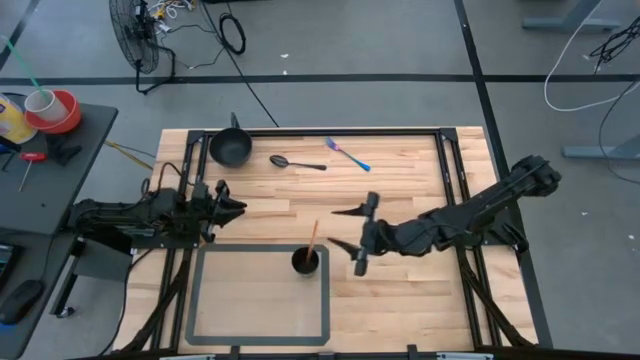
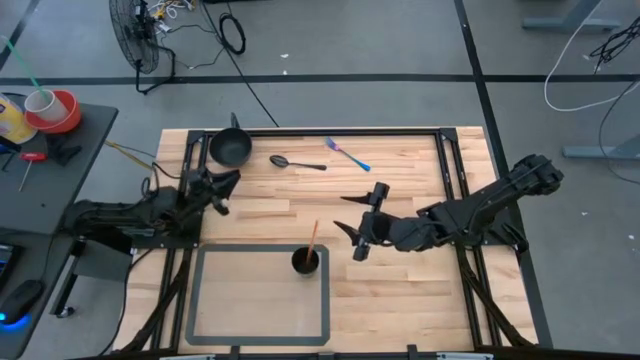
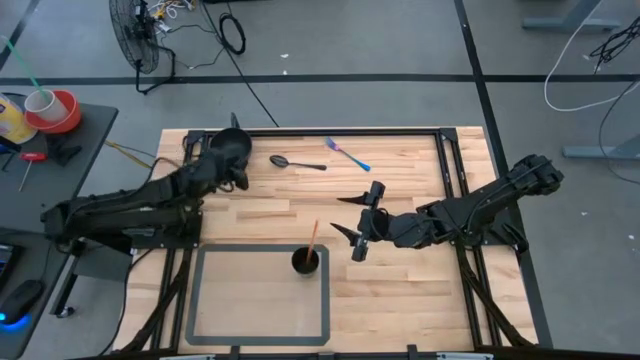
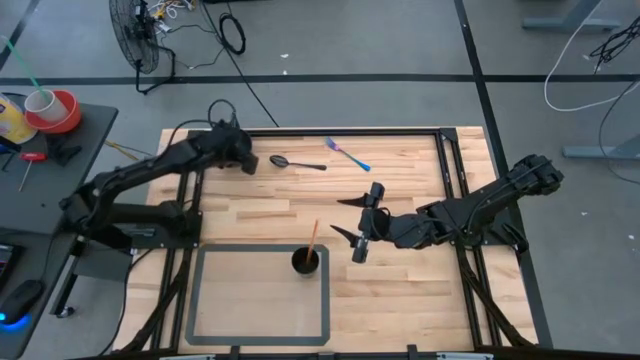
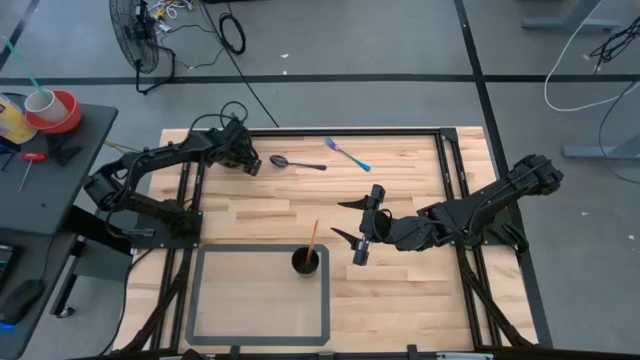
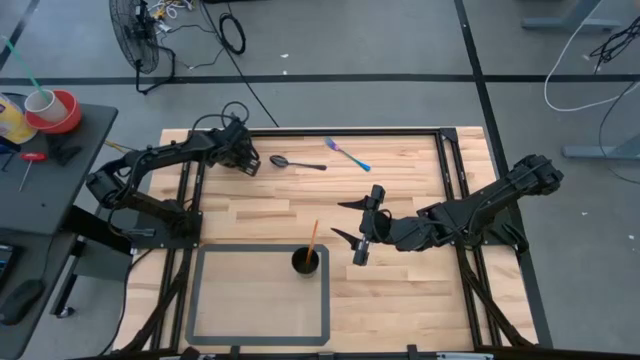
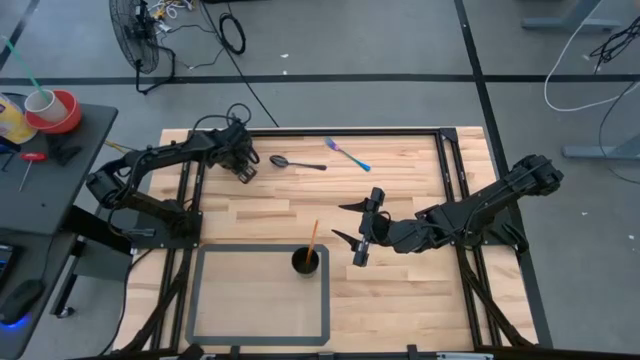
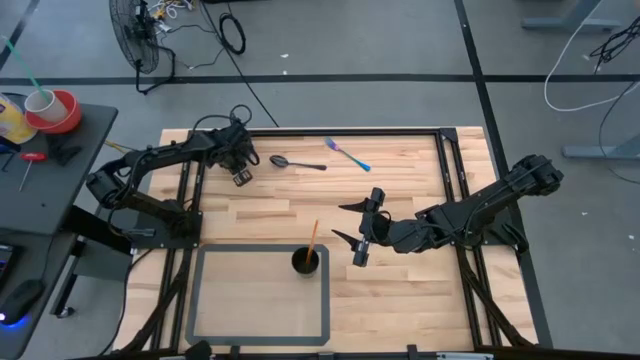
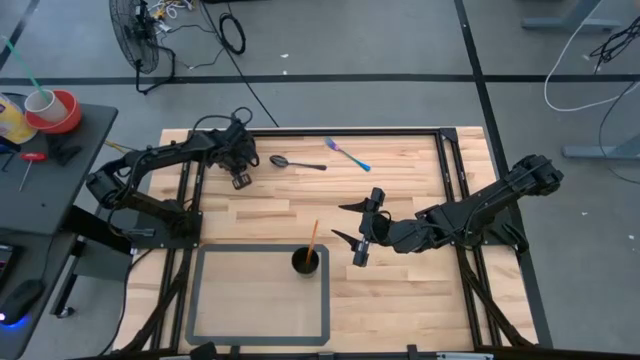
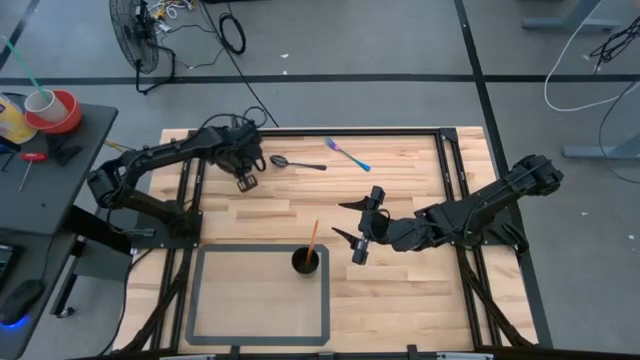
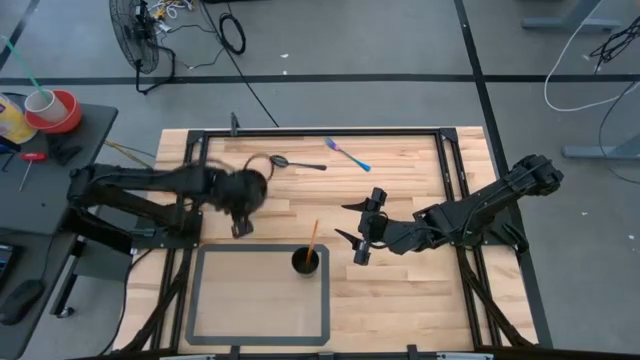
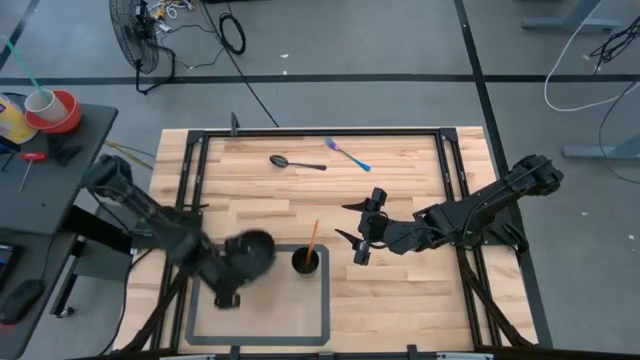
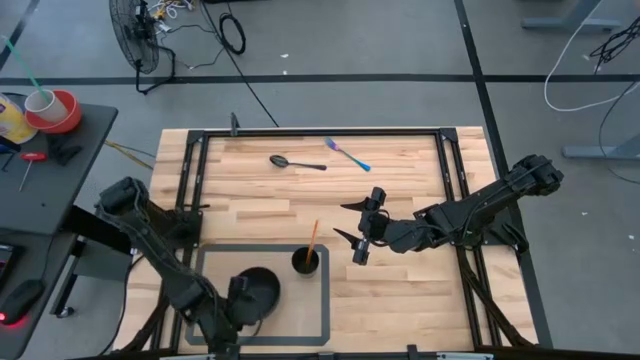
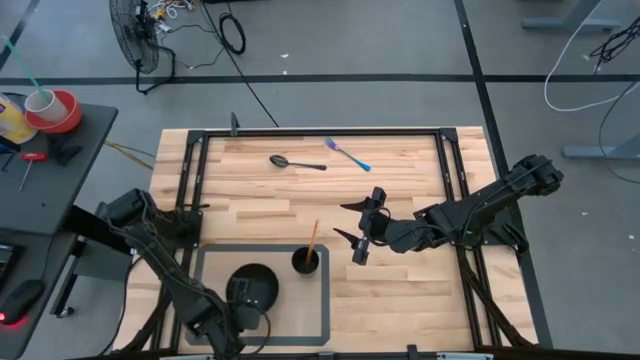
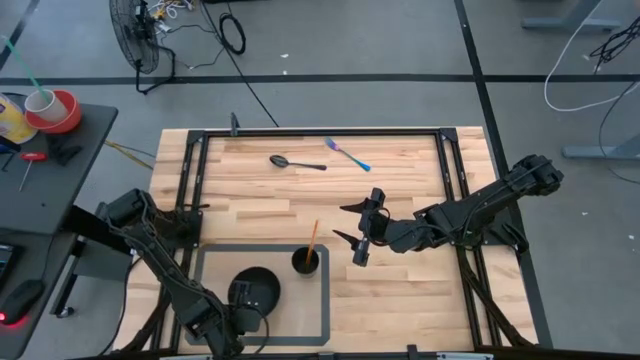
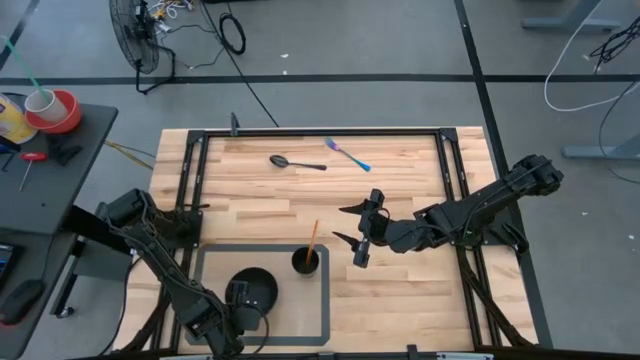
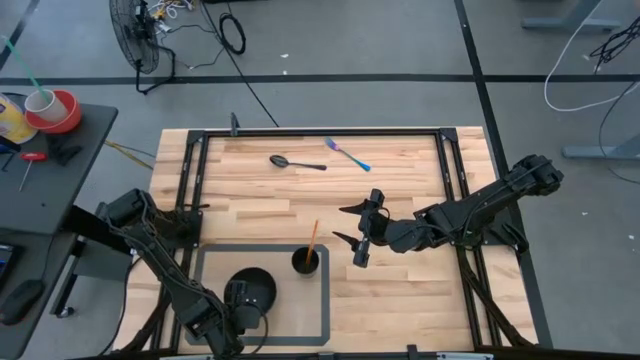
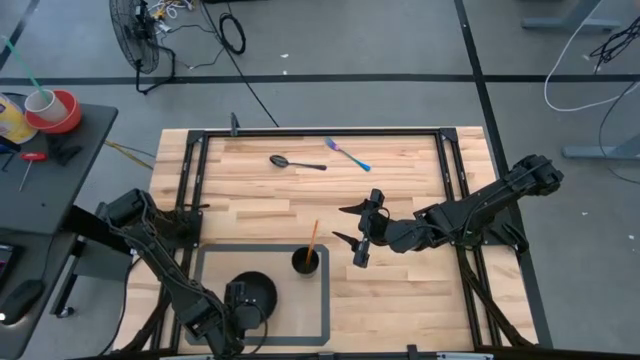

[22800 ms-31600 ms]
Task: Pick & Place Utensil
Put the black bowl on the transparent mat

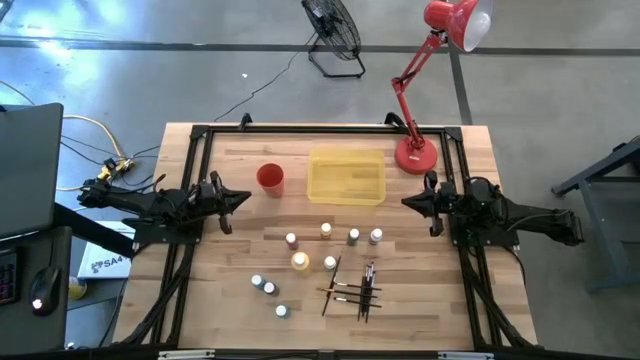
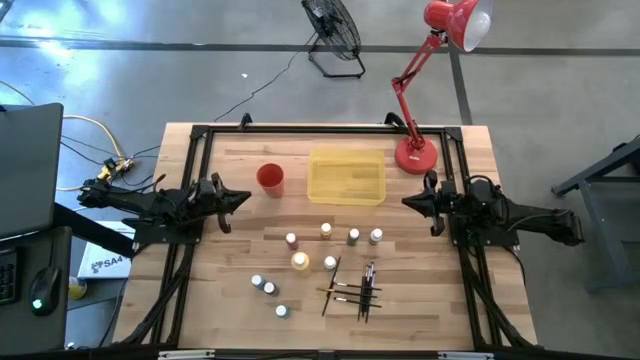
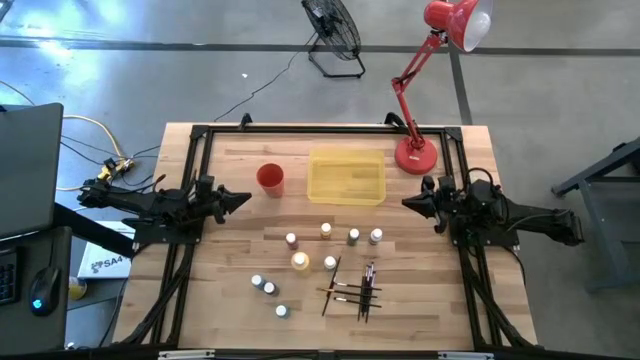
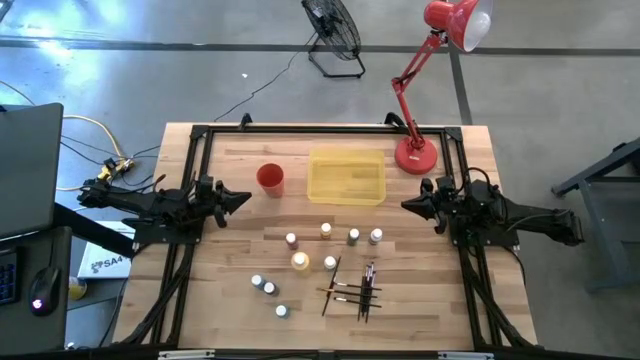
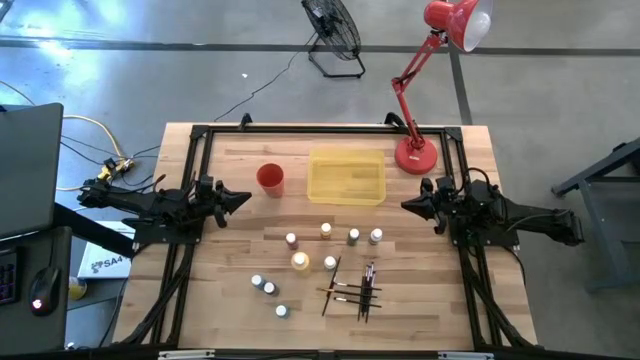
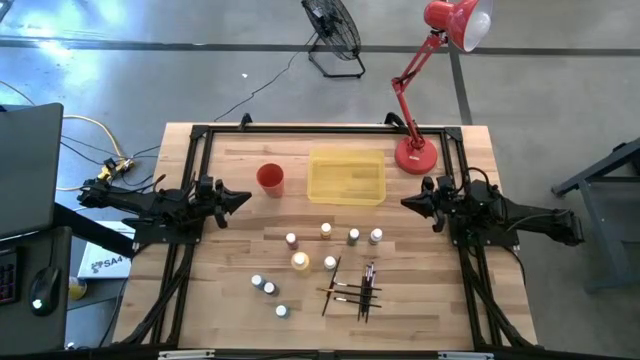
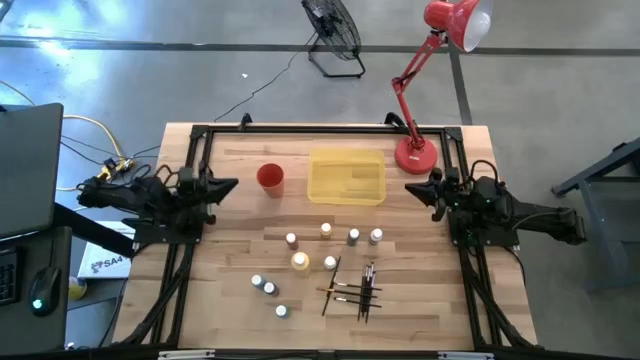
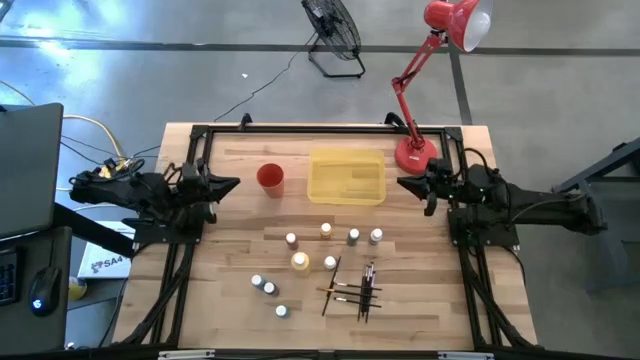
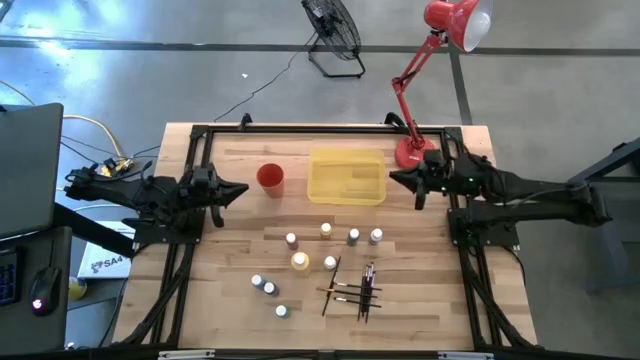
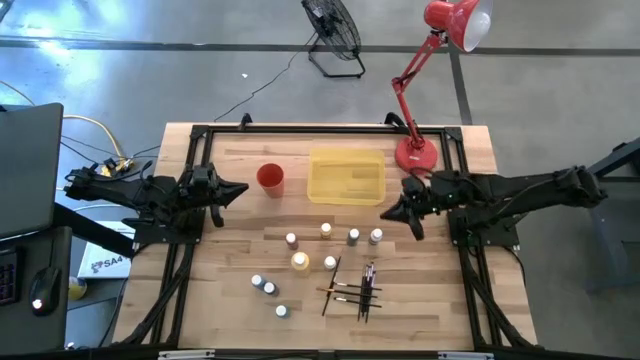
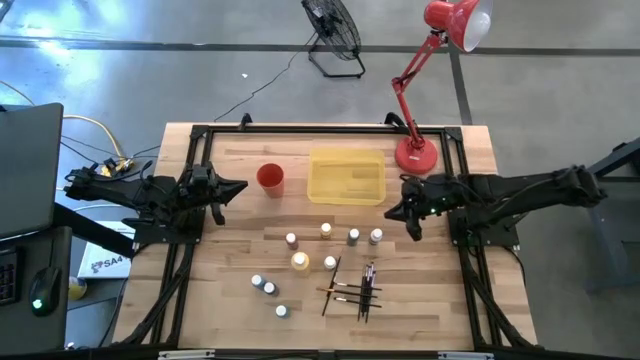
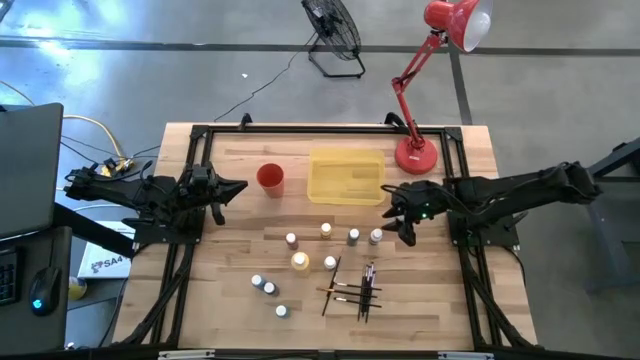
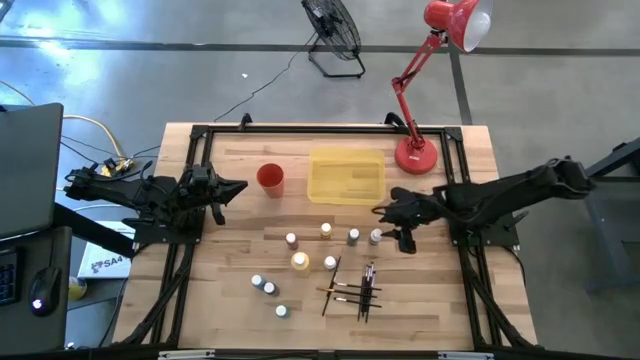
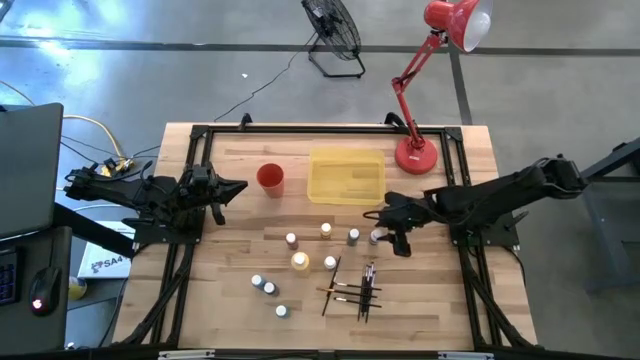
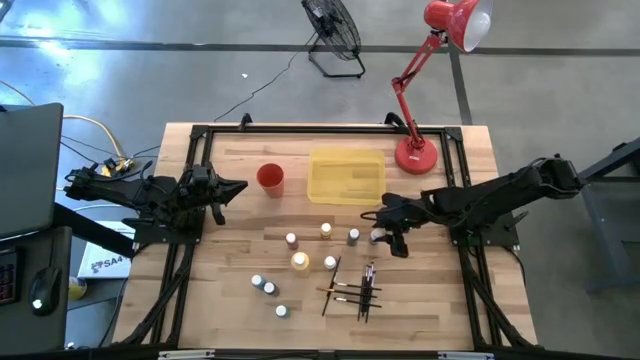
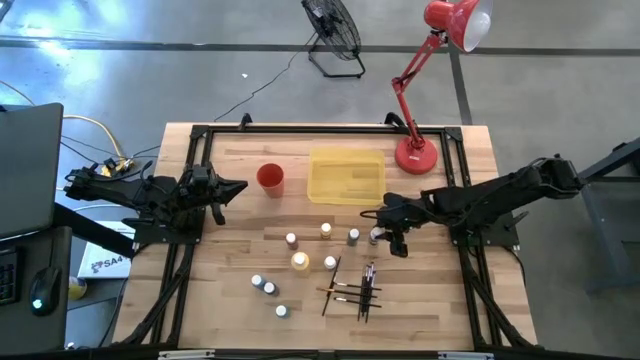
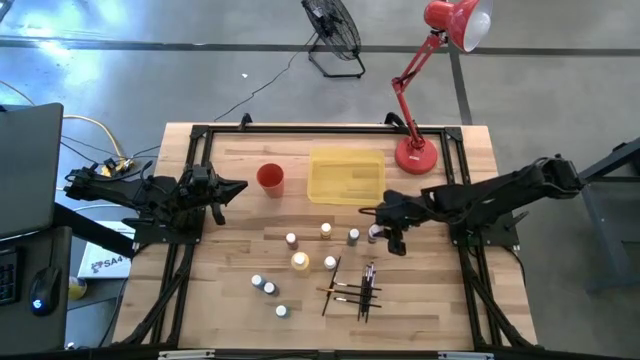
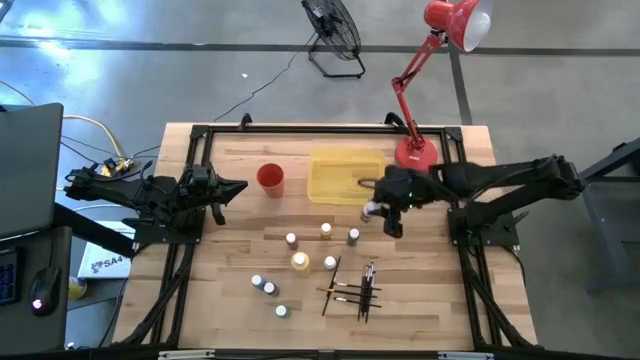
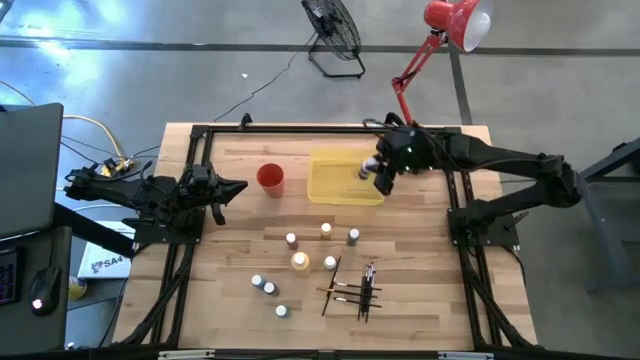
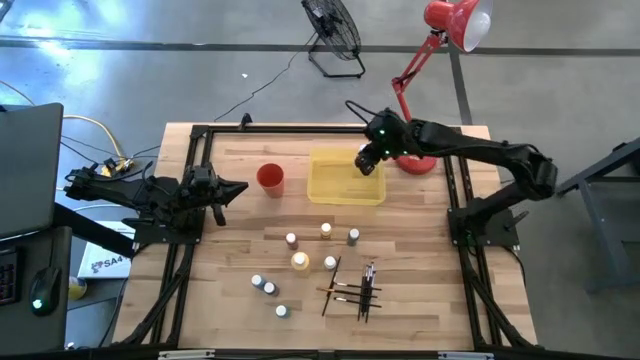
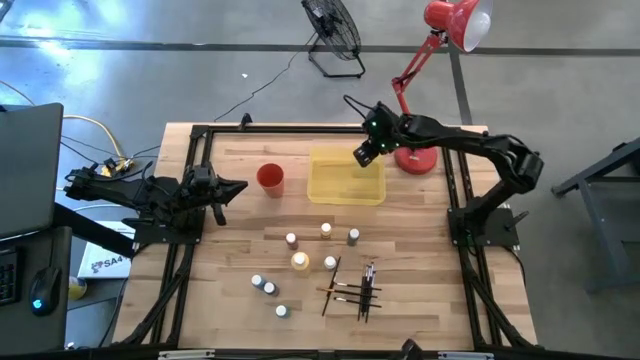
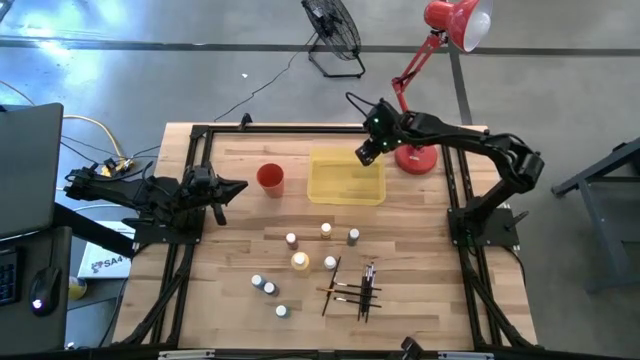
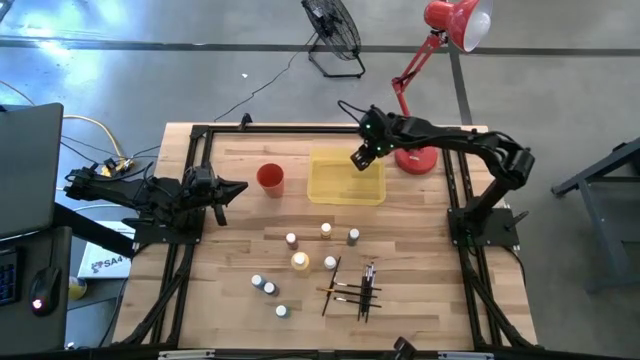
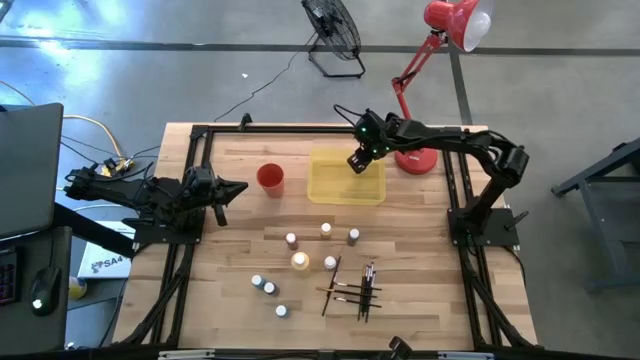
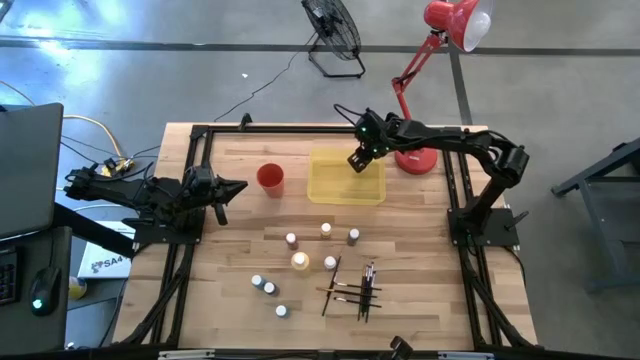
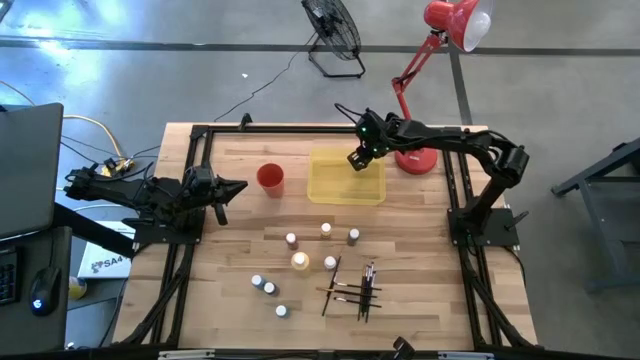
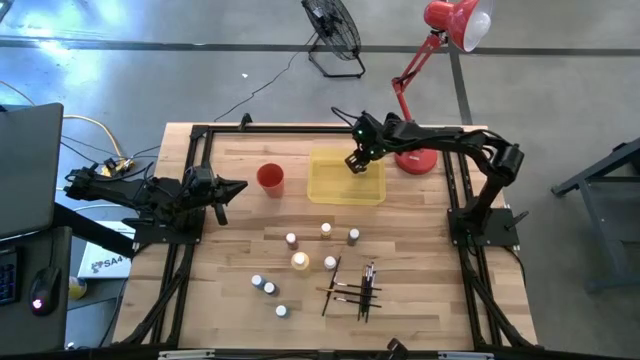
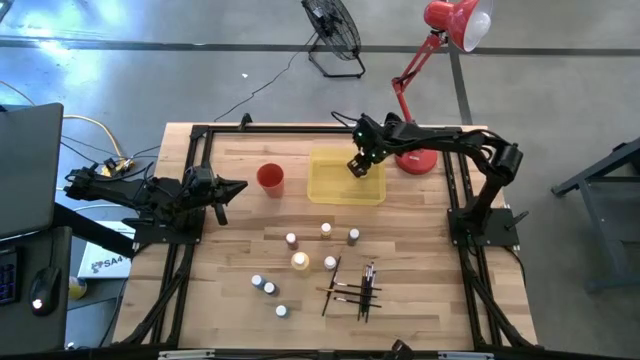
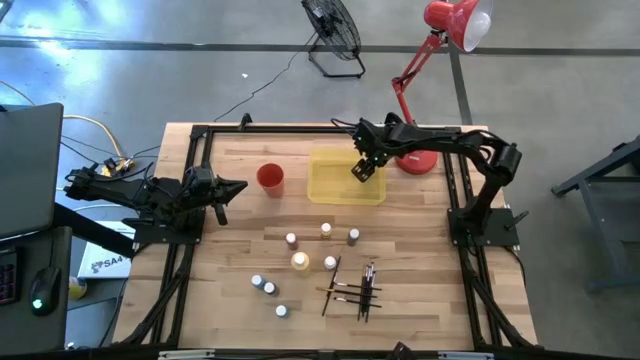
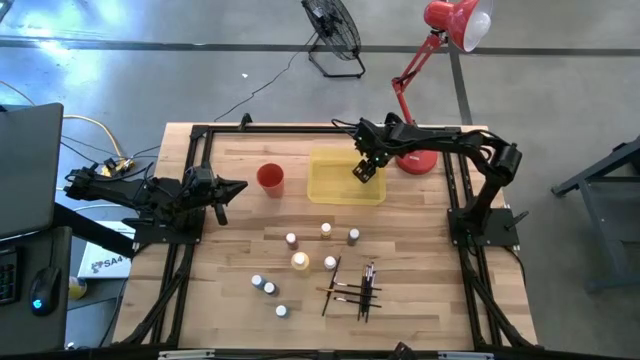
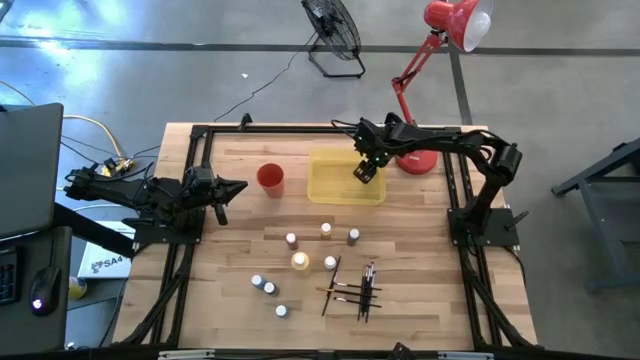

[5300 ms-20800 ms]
Task: Pick & Place Paint Supplies
Put the white paint bottle into the yellow bin
